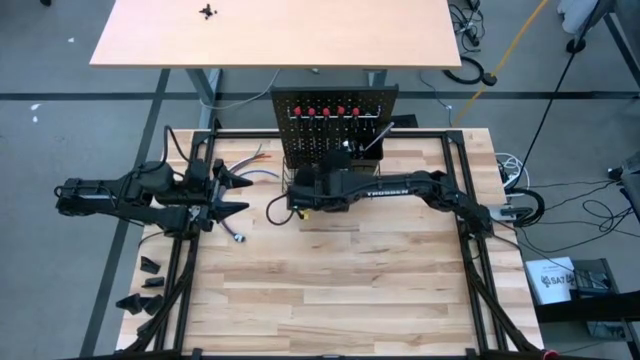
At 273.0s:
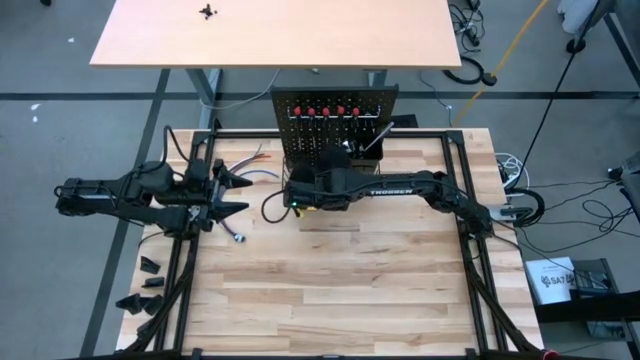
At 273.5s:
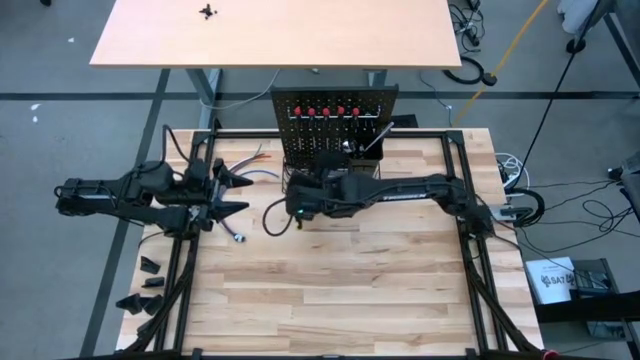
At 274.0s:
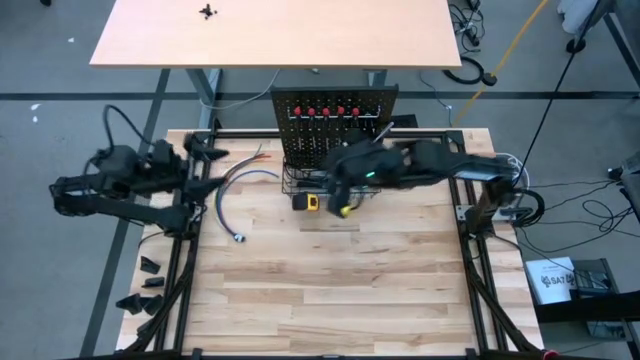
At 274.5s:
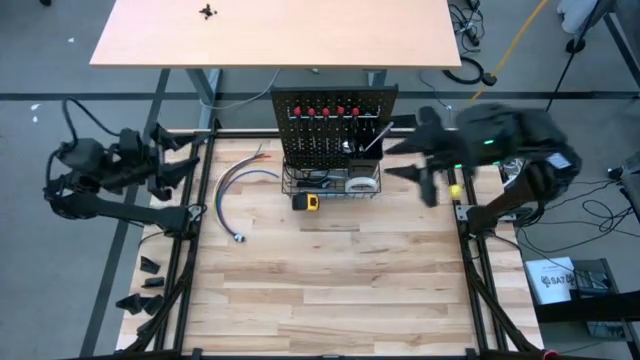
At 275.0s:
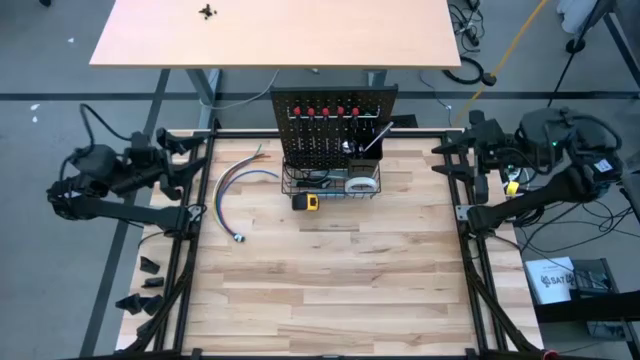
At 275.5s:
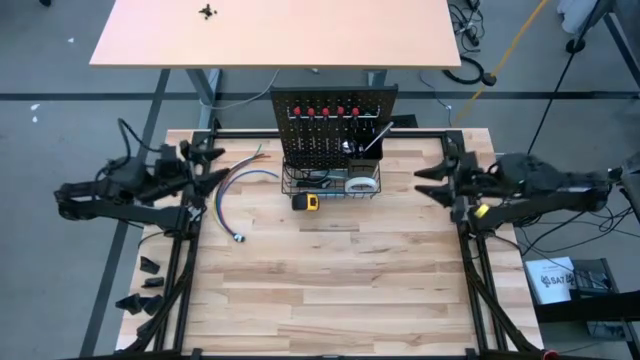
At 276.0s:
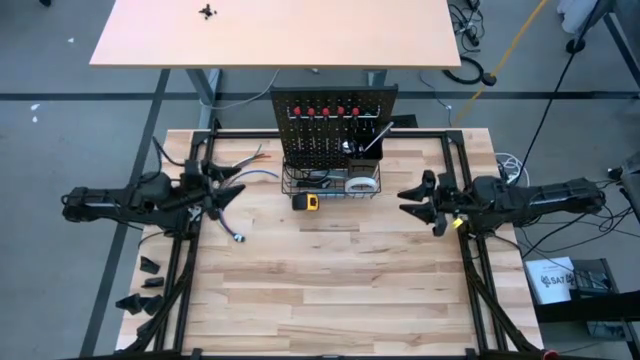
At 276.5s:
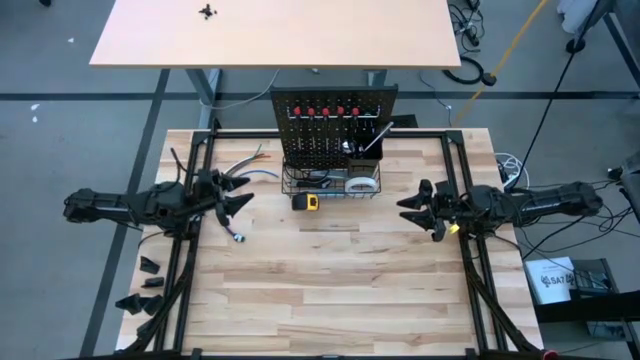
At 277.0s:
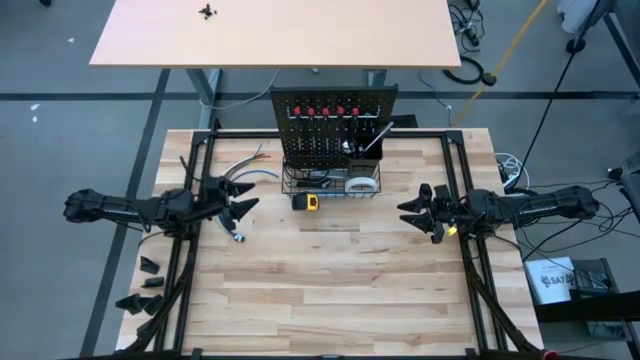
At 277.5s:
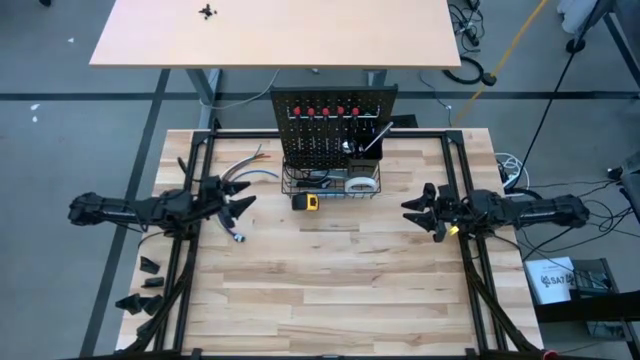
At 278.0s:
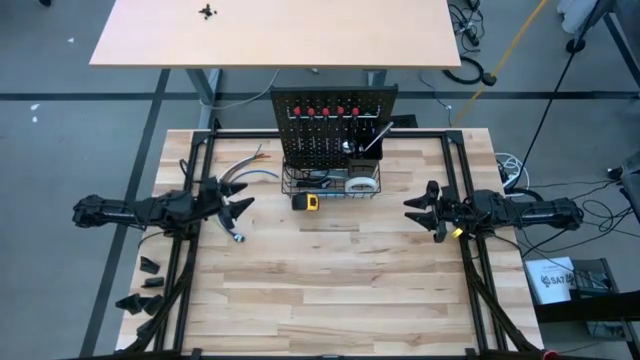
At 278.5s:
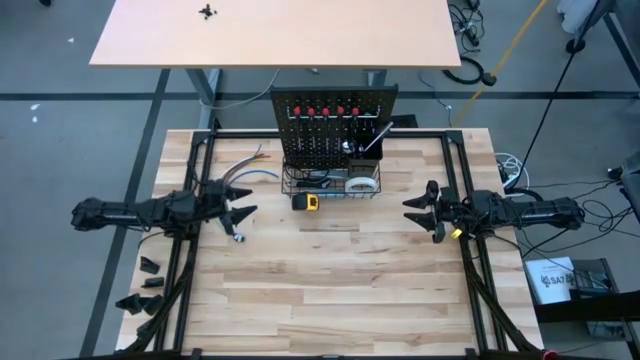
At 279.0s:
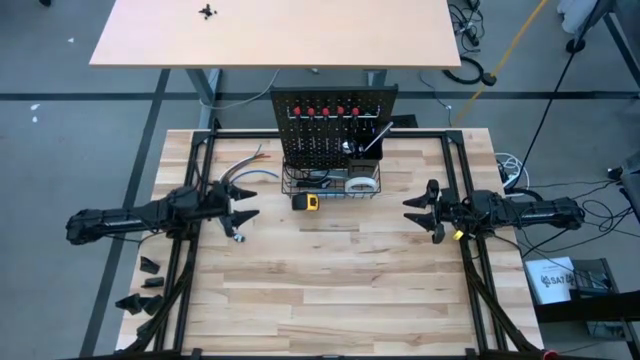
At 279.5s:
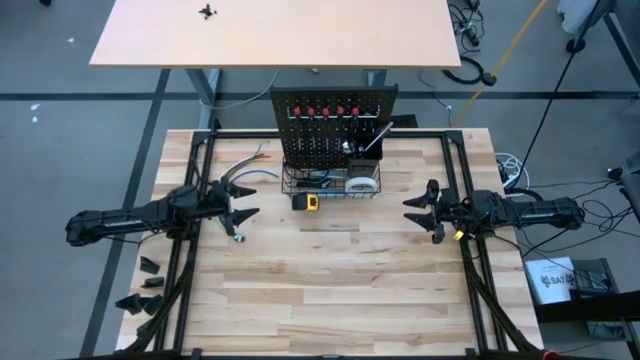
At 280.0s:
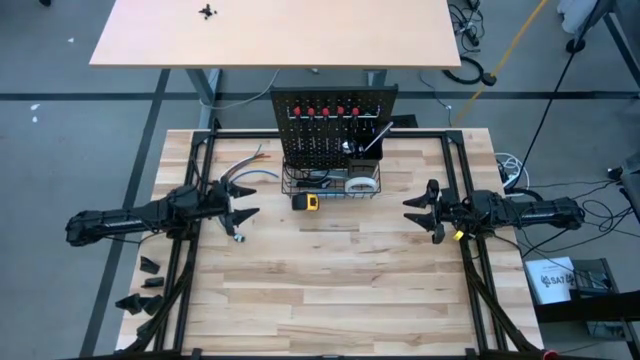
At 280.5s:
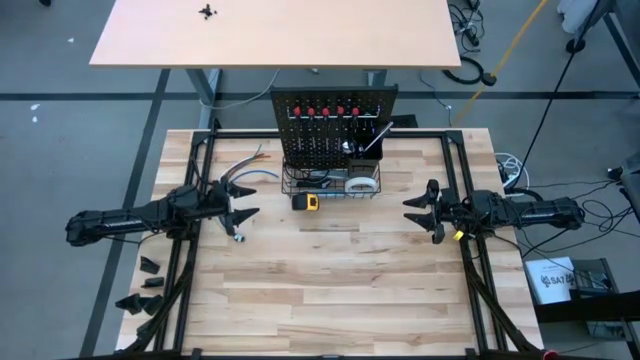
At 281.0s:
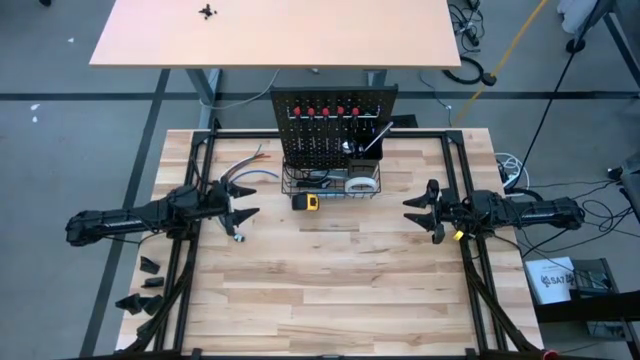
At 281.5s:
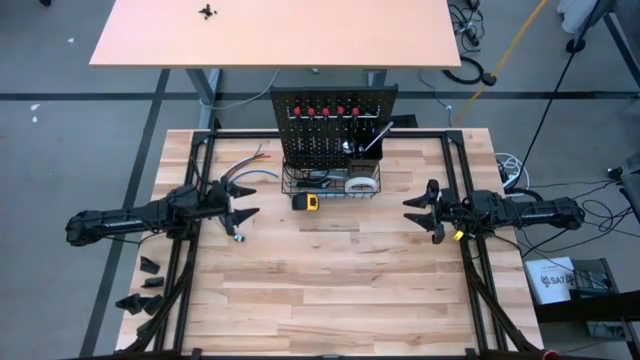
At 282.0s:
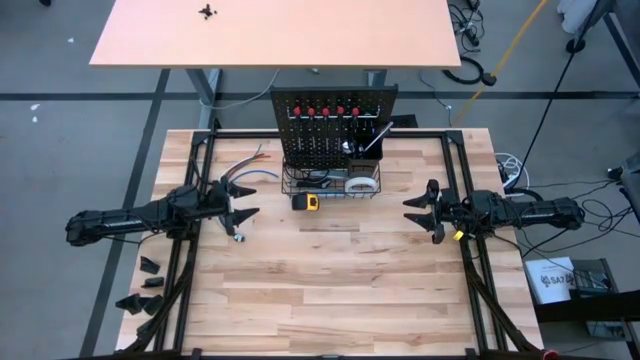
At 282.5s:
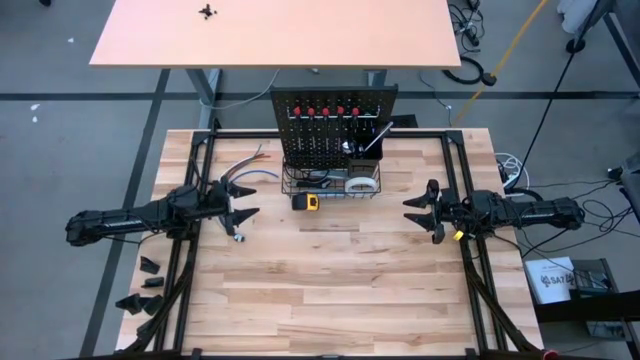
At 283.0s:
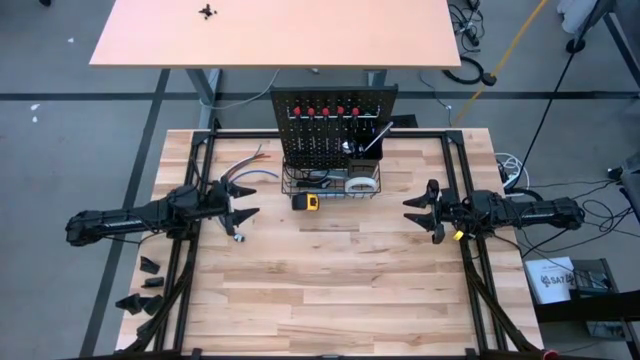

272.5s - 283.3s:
Task: Hang tools onto peg board
Return to Home Position

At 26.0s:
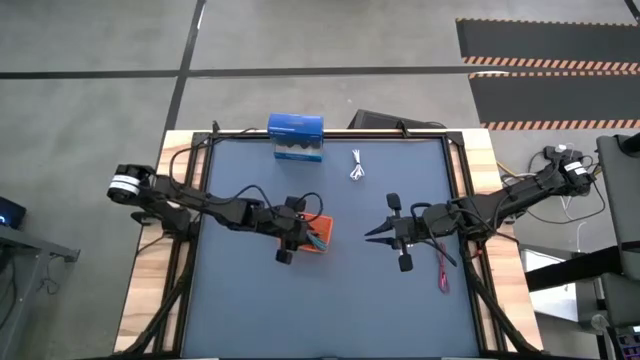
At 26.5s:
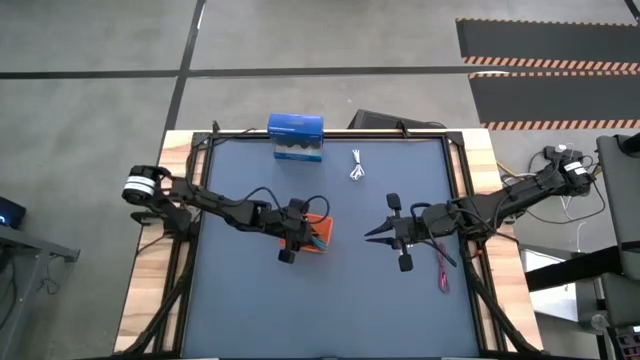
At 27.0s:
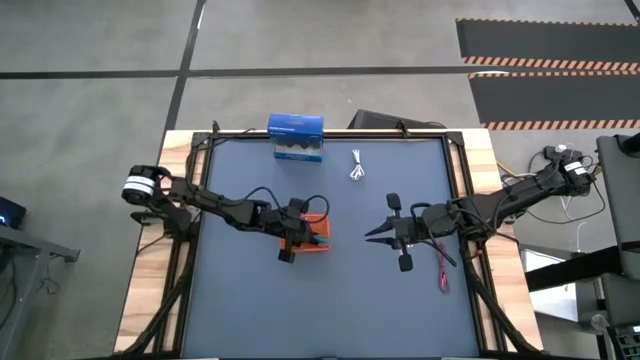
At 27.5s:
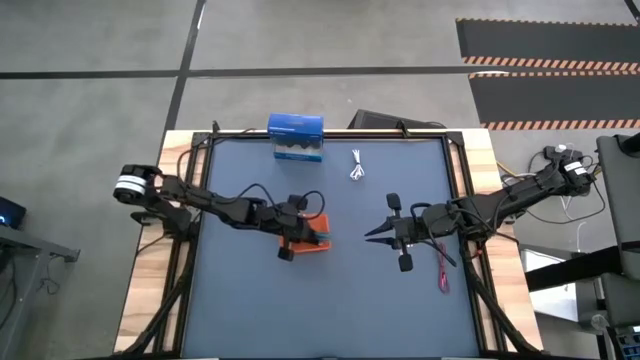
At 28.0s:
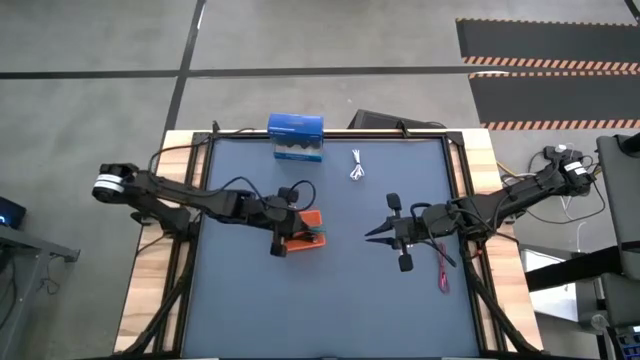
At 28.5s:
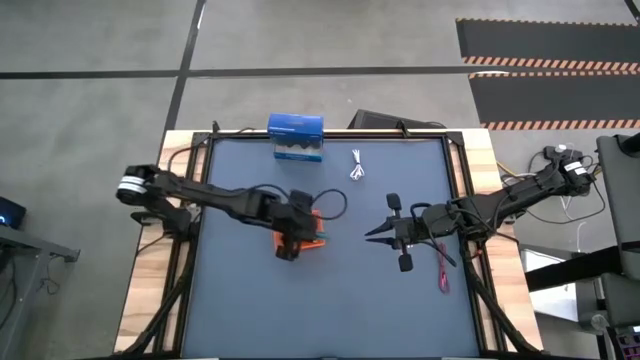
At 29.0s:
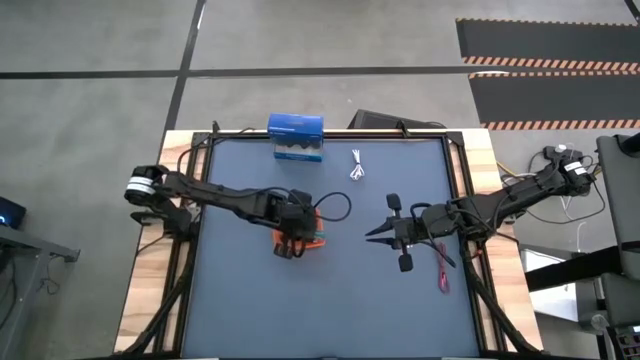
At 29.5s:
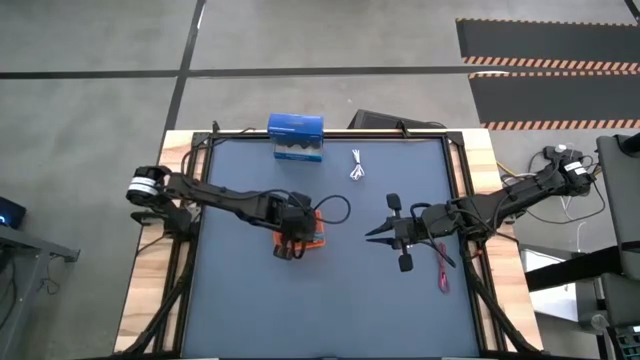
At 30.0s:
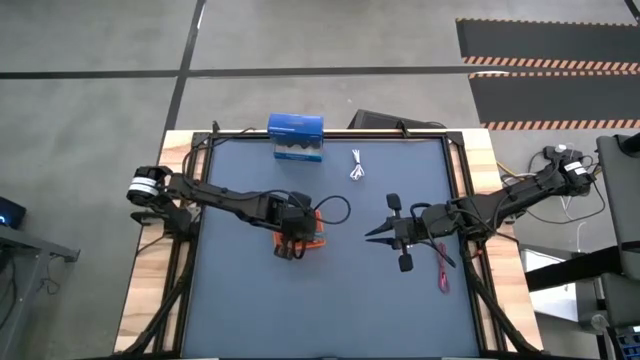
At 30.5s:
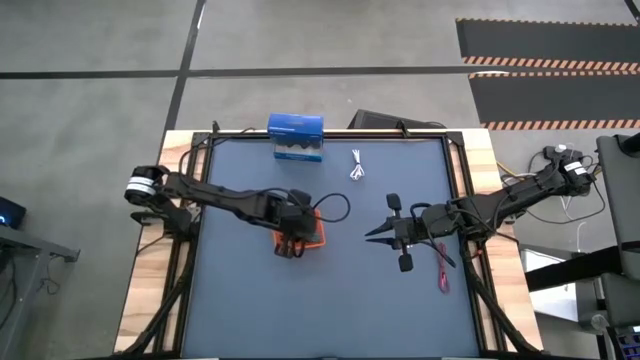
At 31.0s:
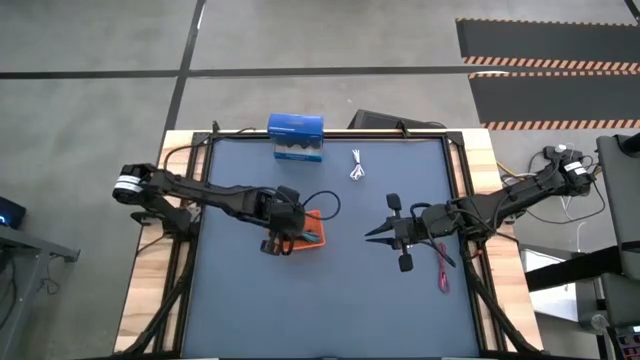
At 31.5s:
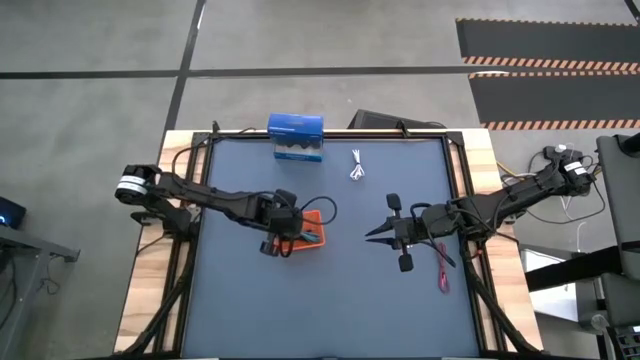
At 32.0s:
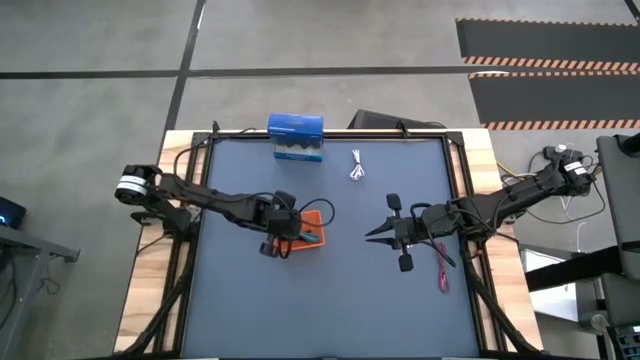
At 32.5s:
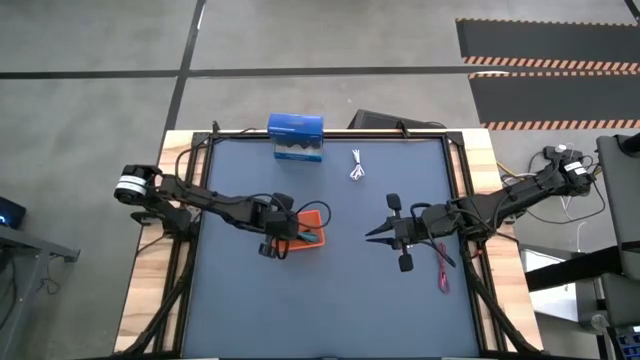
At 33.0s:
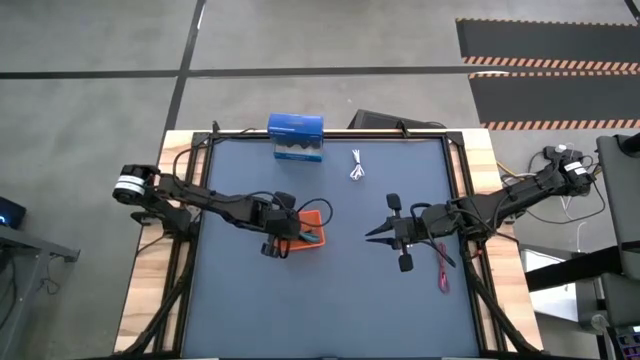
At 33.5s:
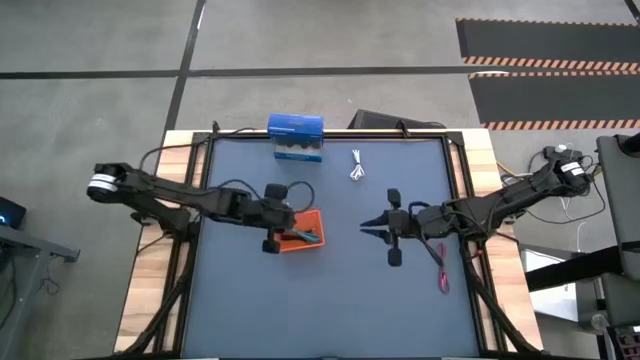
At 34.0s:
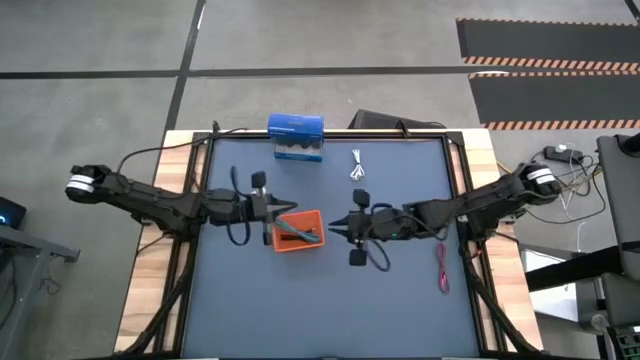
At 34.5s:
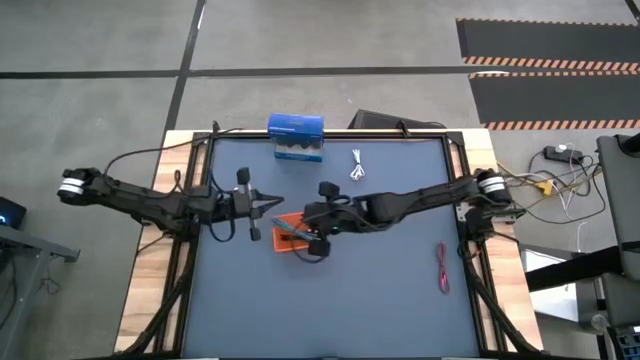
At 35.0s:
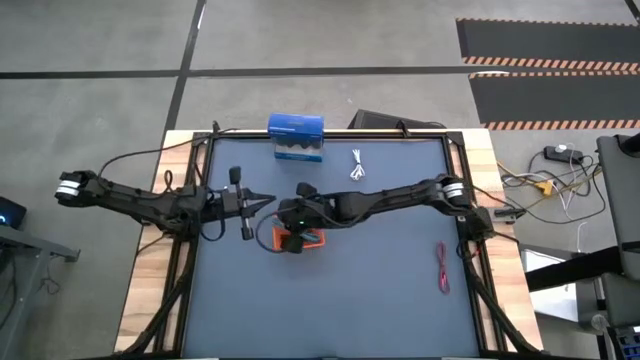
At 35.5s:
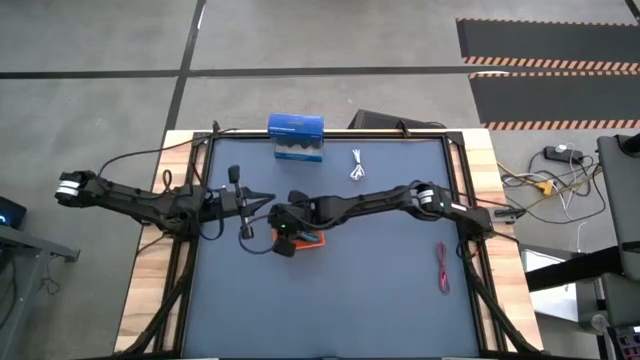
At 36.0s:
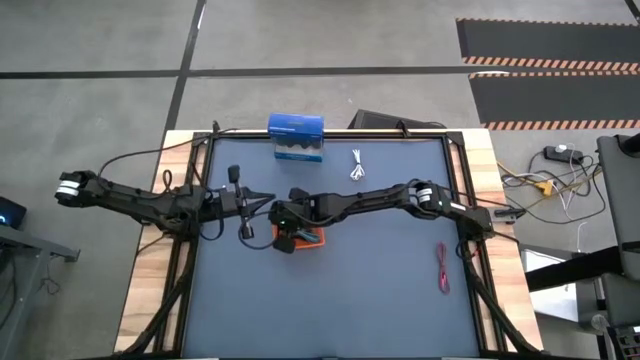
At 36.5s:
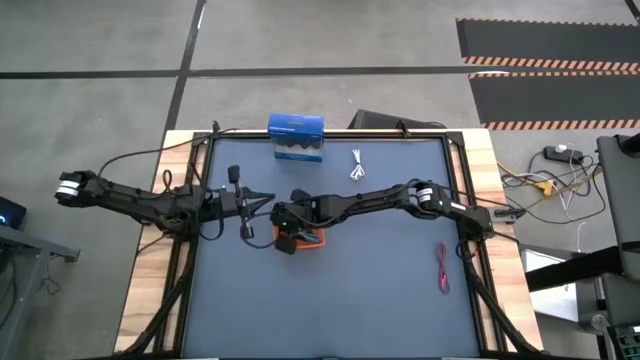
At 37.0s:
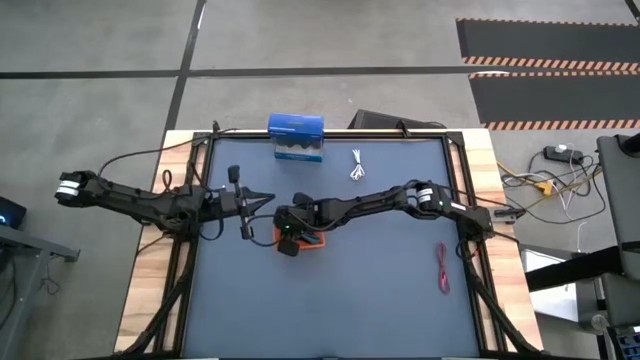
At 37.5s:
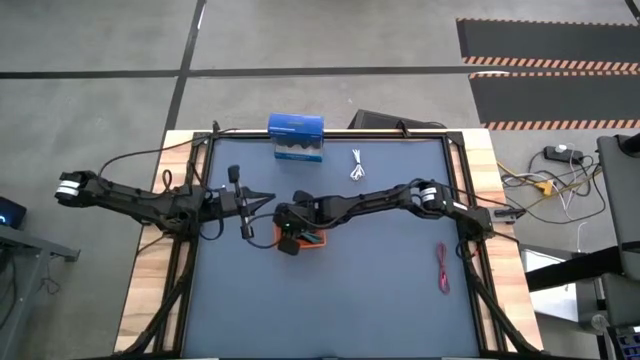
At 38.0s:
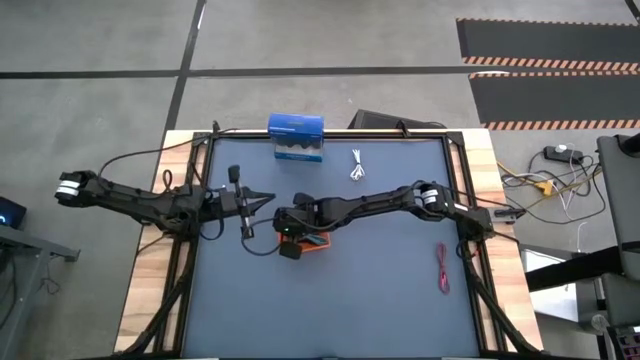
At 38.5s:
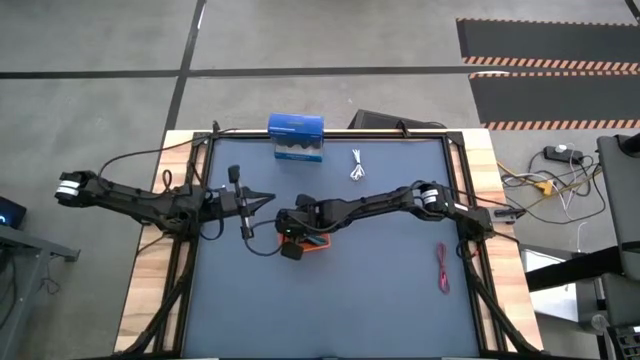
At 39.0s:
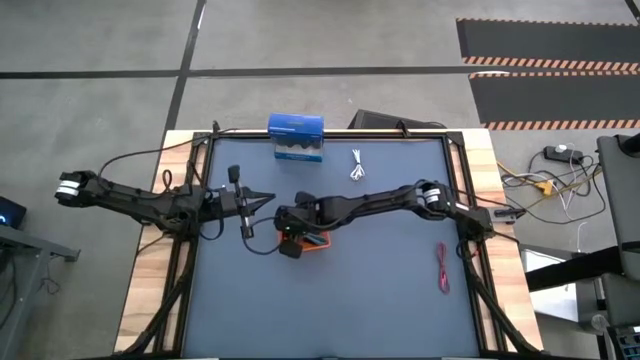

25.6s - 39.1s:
Task: Pick and place USB-C Cables
Put the blue charger cable into the orange bin
